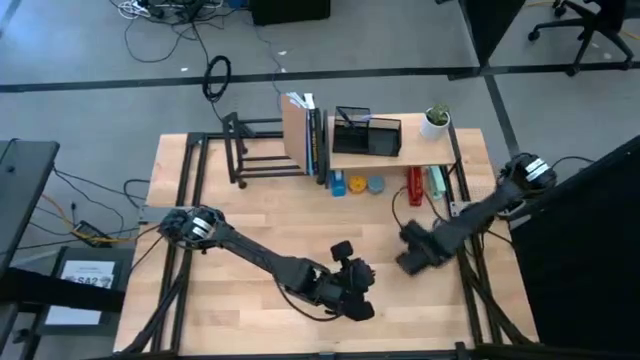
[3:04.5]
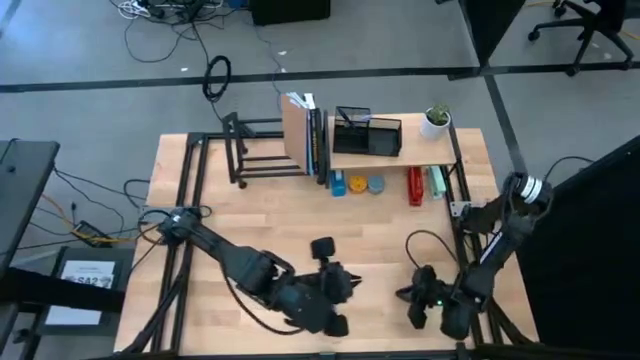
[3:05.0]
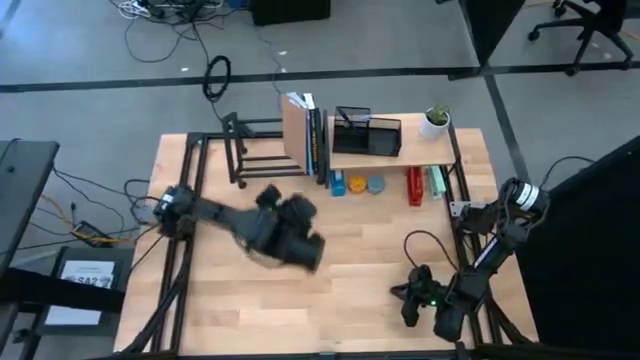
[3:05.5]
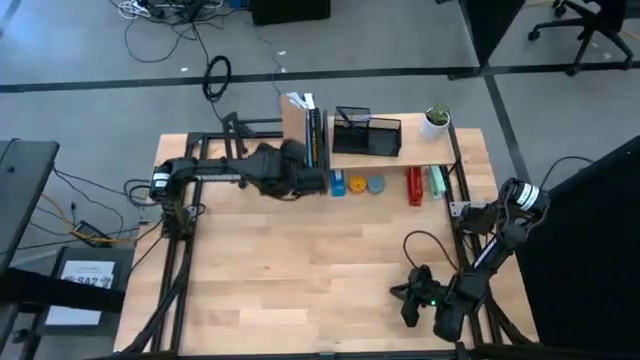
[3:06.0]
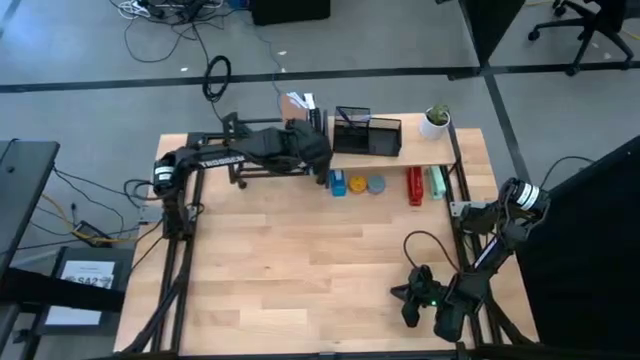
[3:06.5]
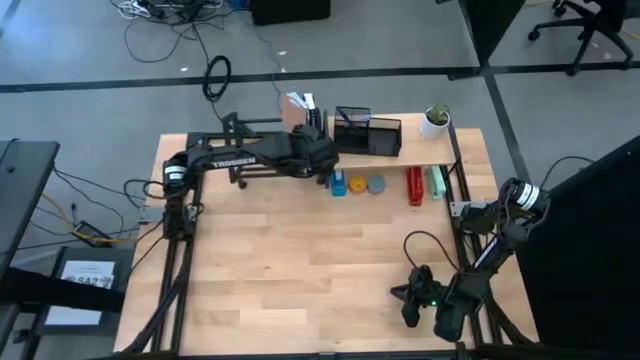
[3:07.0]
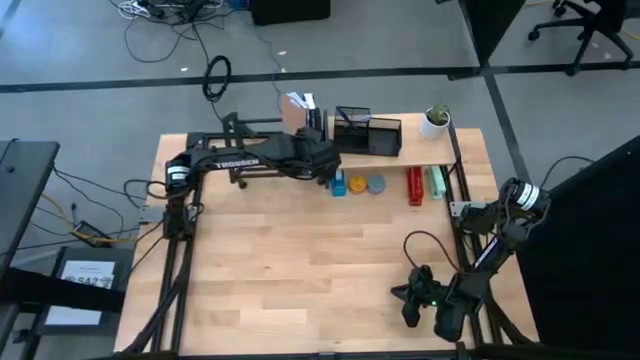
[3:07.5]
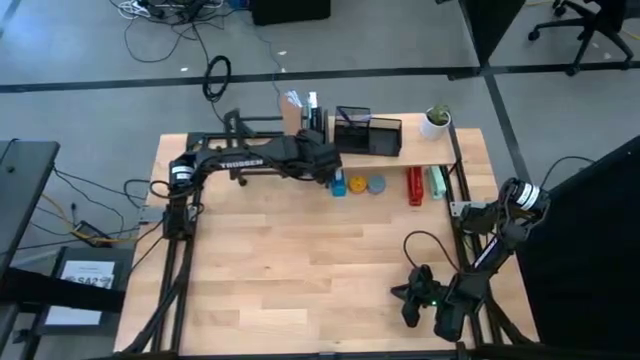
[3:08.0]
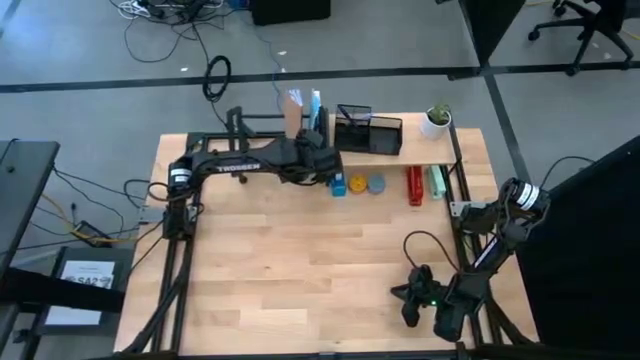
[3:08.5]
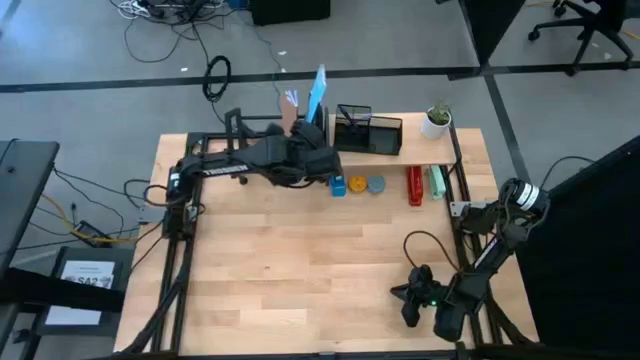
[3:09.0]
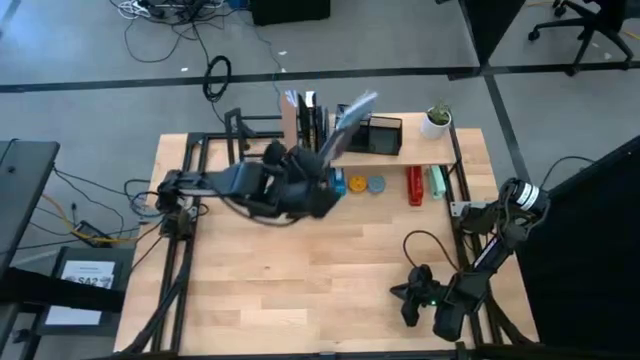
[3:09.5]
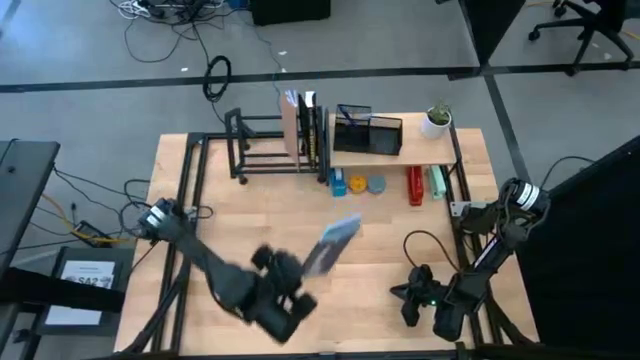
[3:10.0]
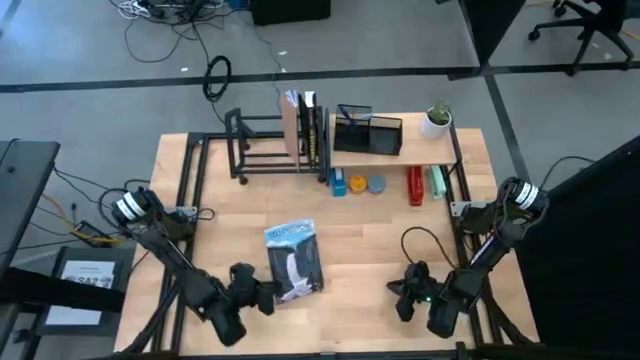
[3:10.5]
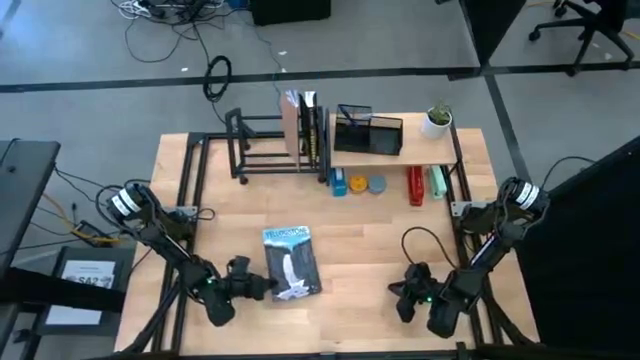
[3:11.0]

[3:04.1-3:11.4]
Task: Stock shelves
Remove the light blue book from the book shelf

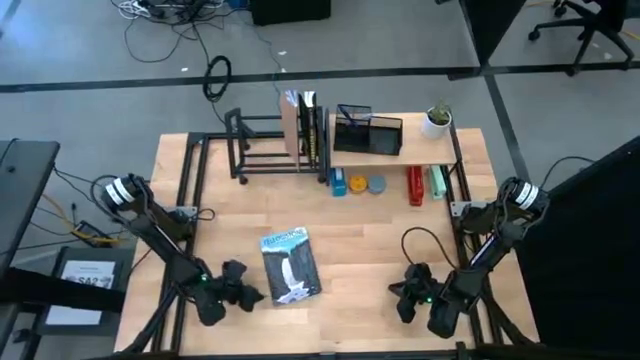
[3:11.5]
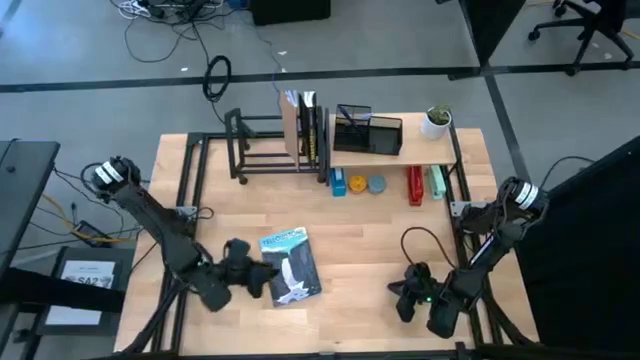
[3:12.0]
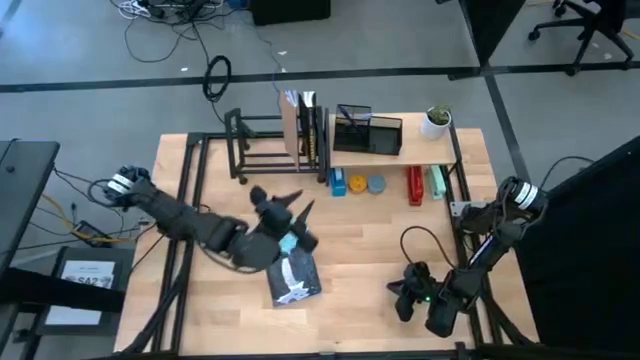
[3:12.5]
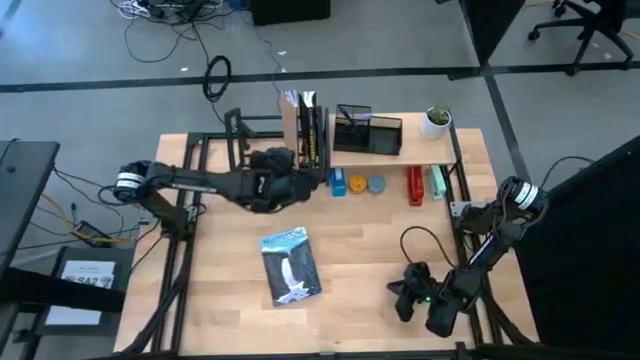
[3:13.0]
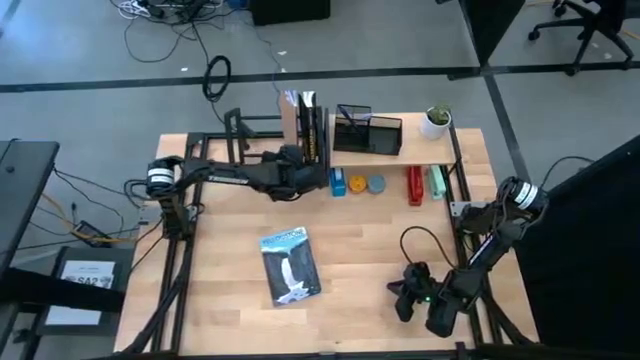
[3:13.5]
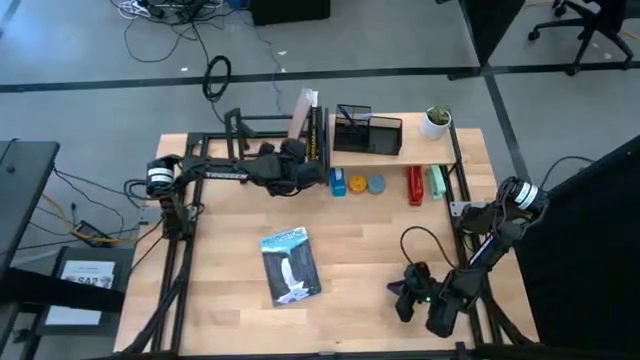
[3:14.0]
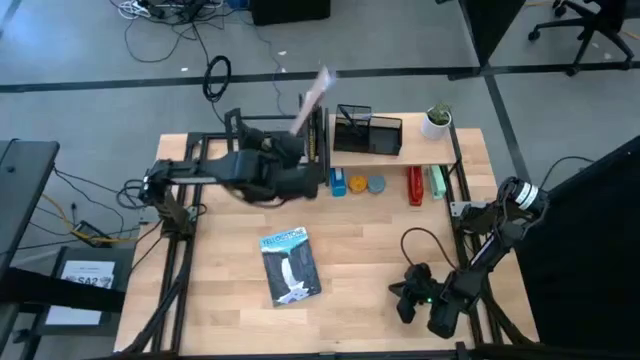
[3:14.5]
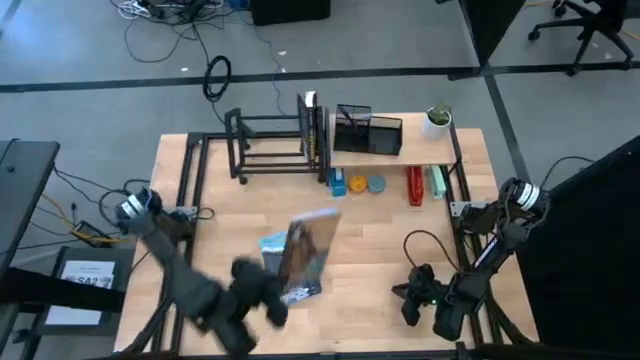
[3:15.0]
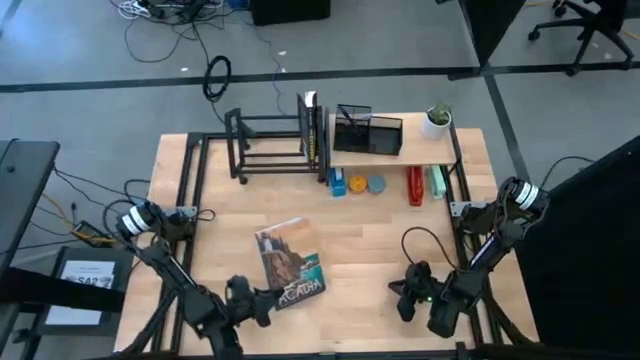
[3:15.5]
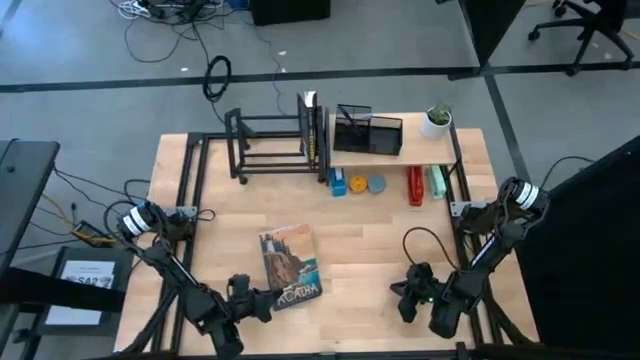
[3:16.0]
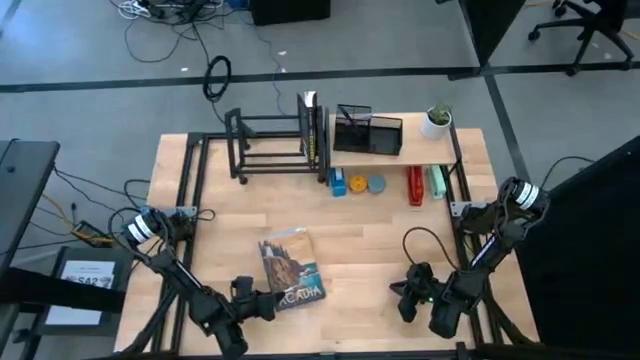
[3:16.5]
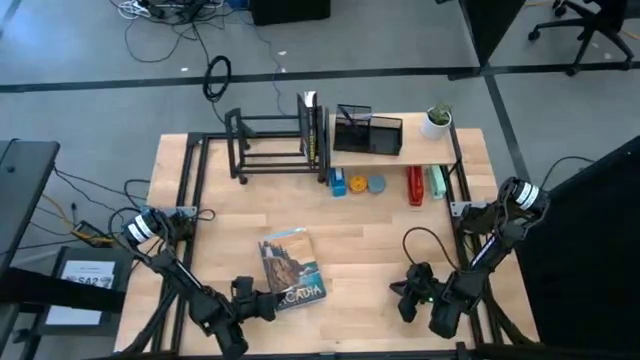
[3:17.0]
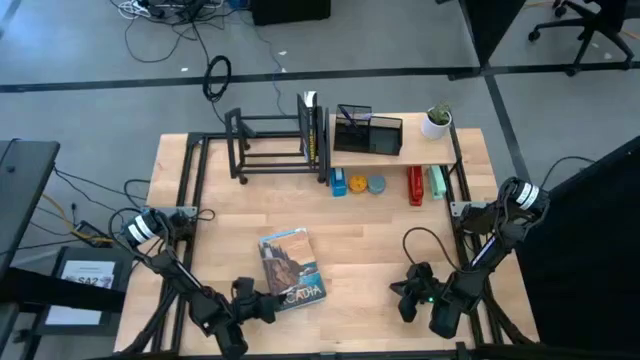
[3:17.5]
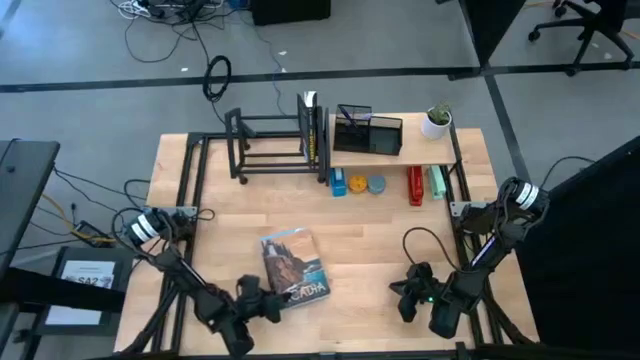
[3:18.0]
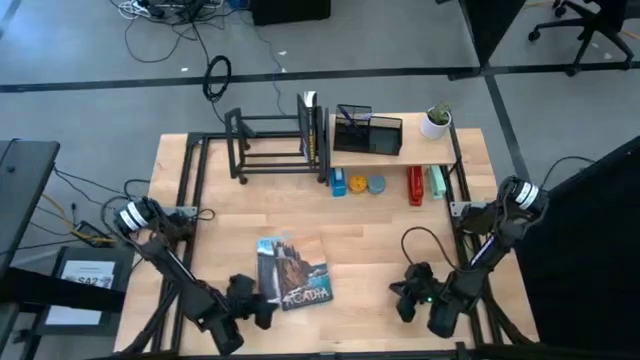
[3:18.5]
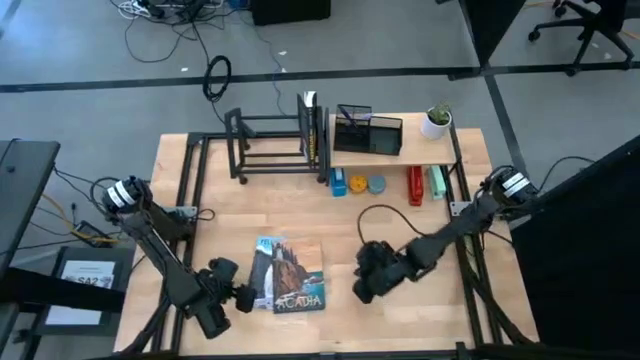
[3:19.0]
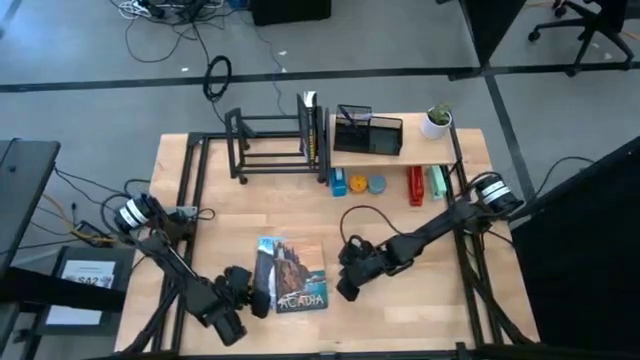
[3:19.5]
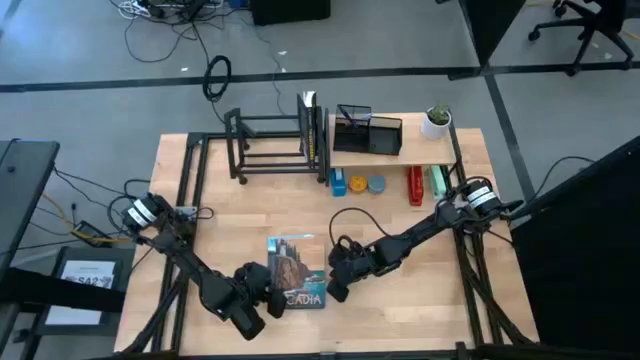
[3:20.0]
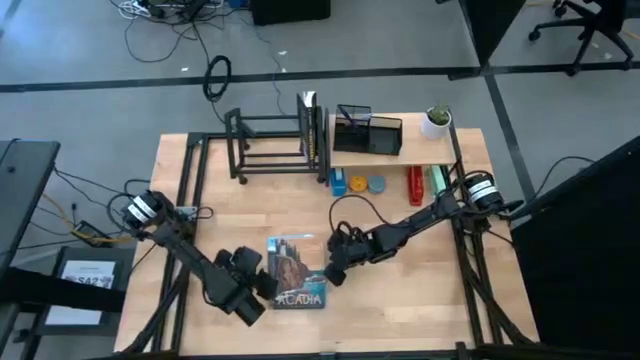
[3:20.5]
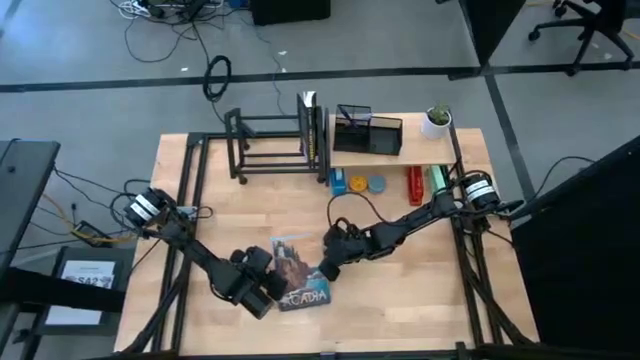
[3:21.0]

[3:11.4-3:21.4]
Remove the brown book from the book shelf

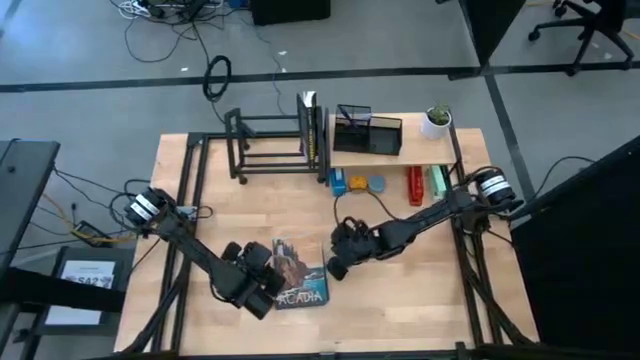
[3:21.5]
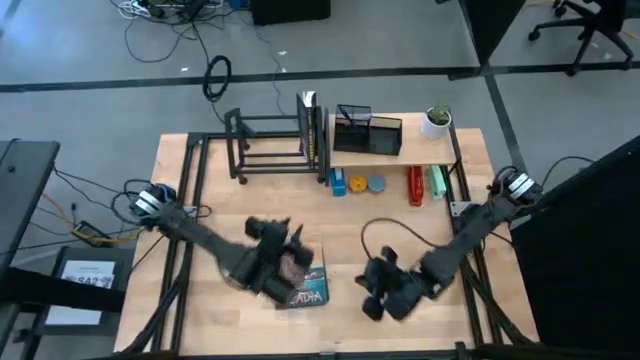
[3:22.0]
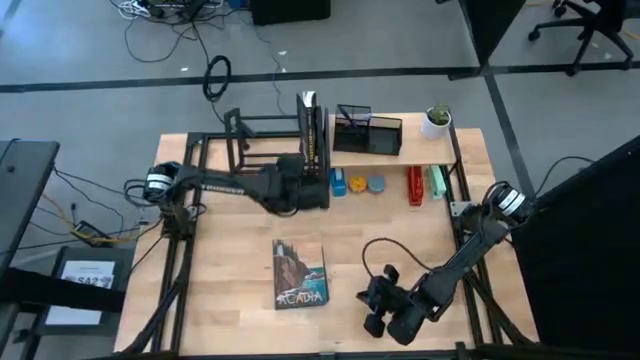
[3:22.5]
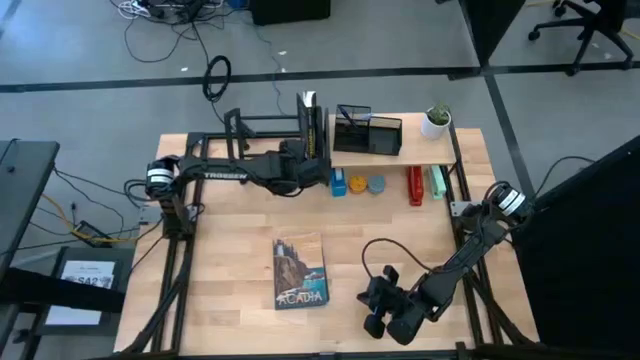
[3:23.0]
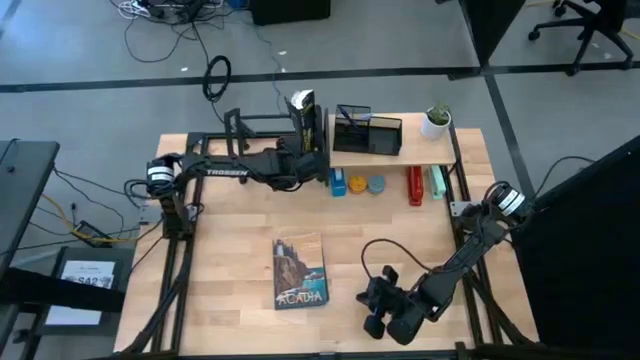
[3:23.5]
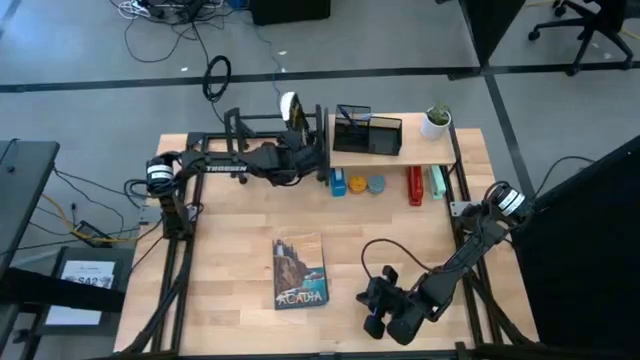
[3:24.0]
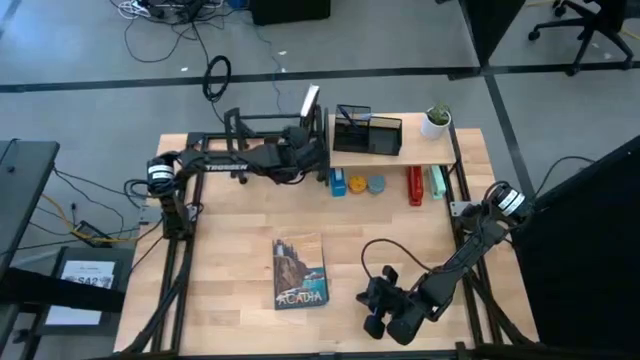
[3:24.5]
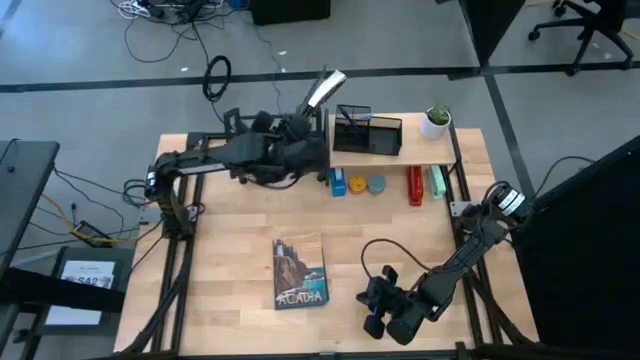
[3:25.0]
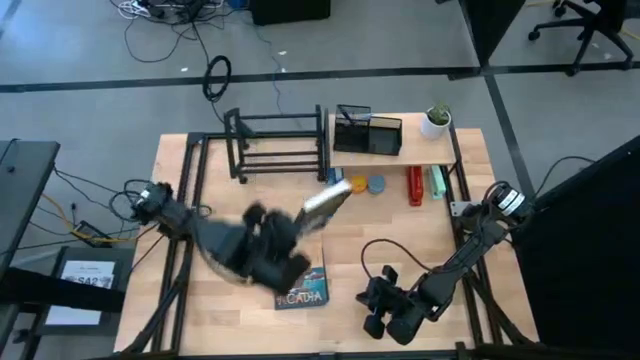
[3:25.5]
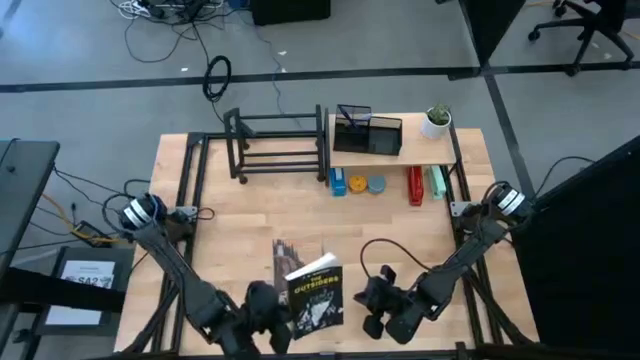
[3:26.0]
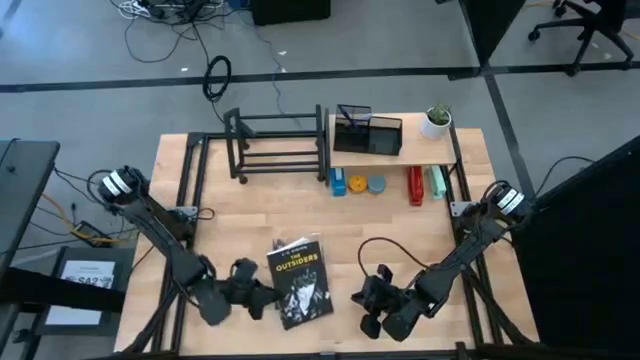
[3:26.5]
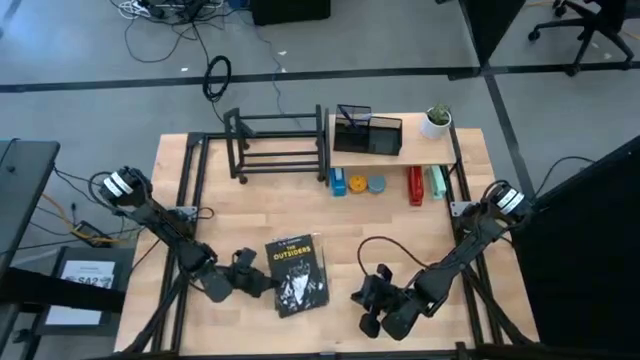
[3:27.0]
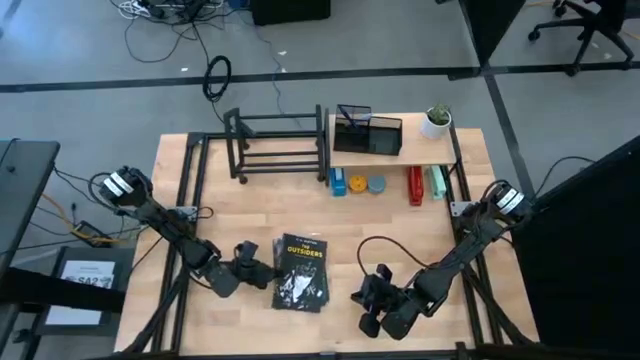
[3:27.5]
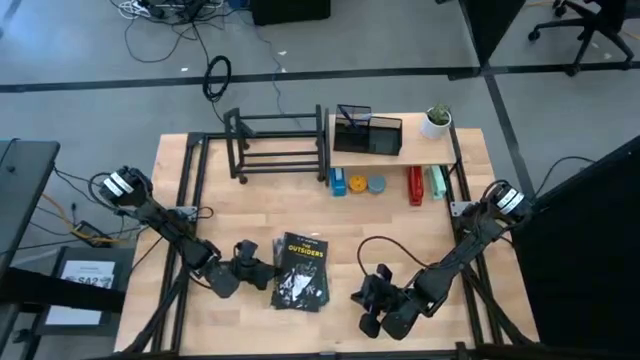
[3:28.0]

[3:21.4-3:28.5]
Remove the black book from the book shelf
